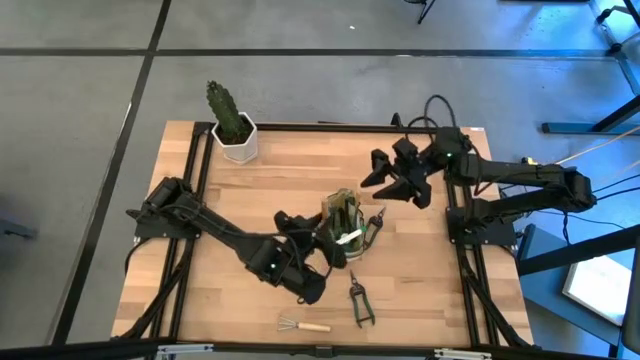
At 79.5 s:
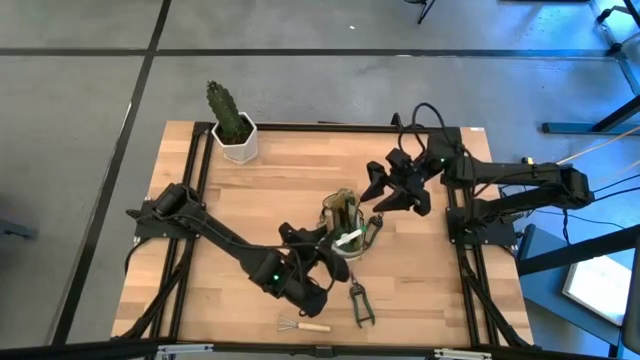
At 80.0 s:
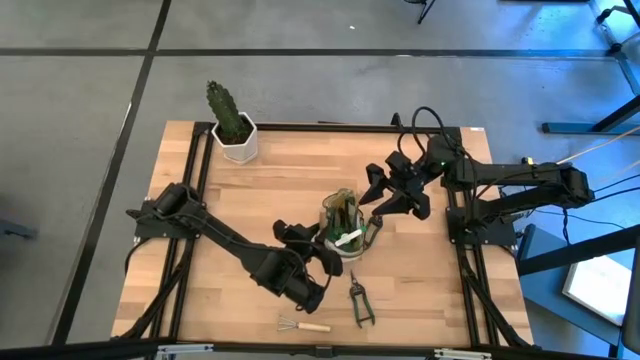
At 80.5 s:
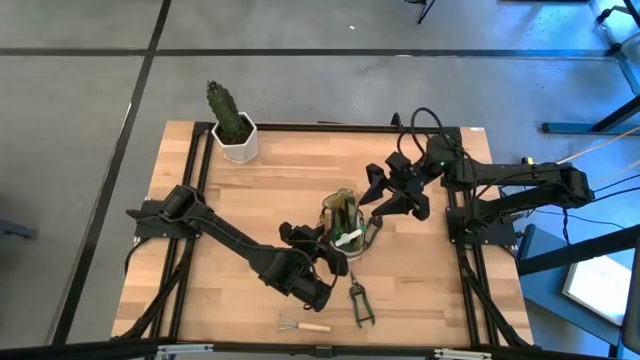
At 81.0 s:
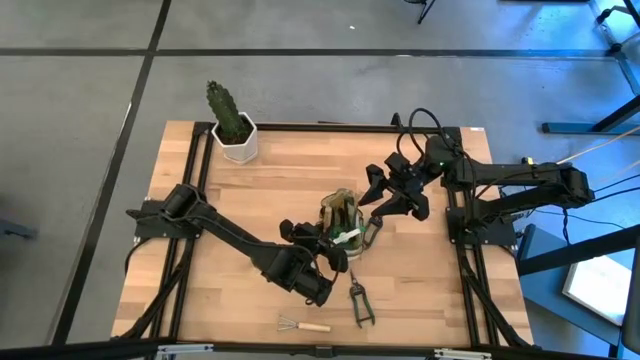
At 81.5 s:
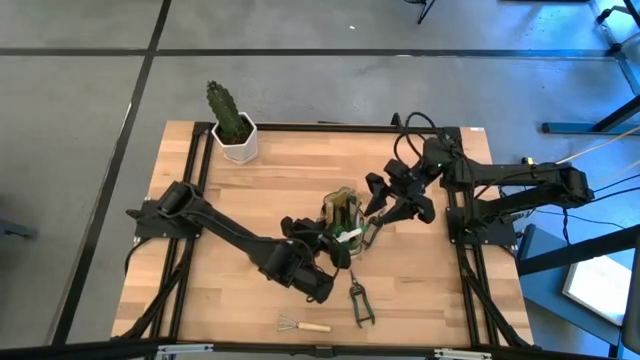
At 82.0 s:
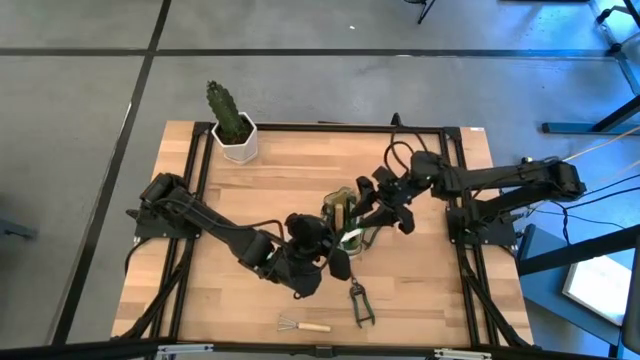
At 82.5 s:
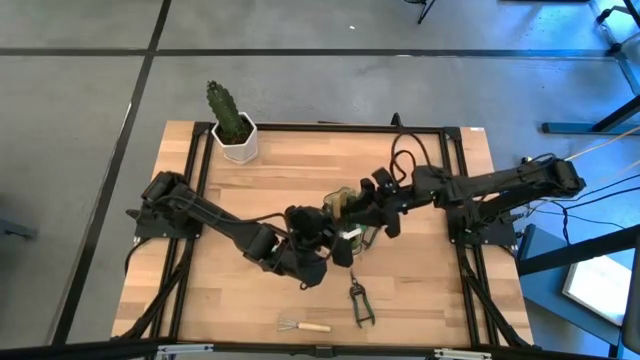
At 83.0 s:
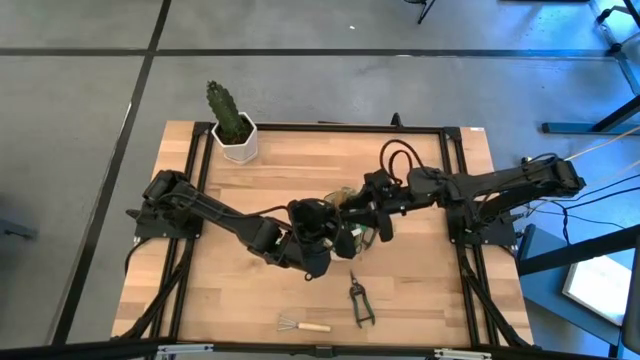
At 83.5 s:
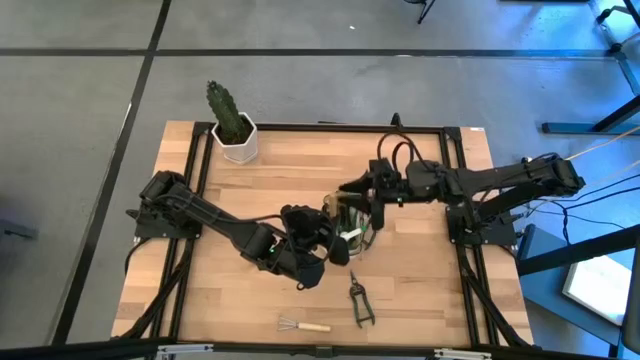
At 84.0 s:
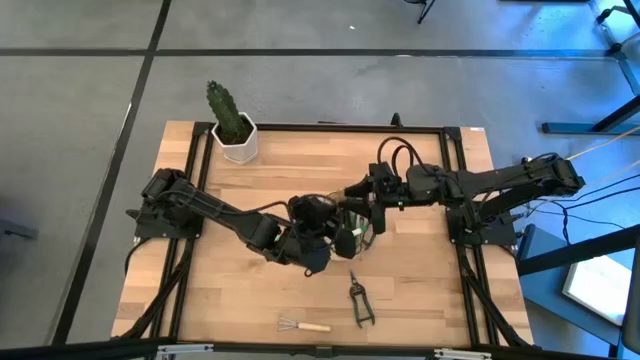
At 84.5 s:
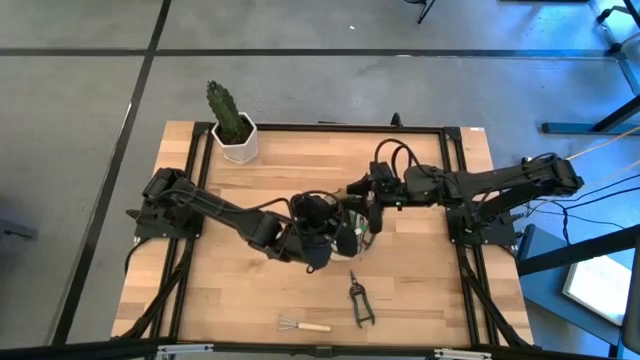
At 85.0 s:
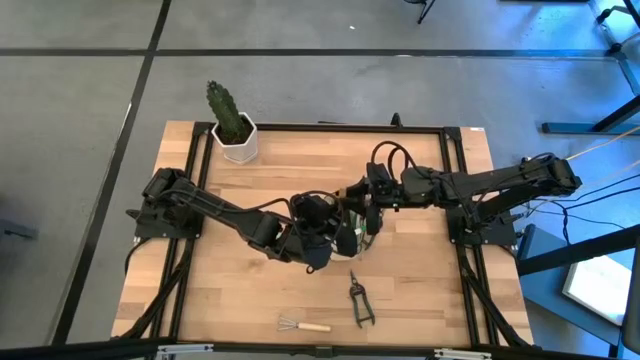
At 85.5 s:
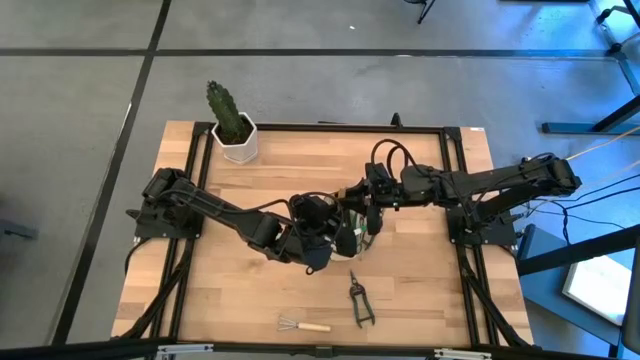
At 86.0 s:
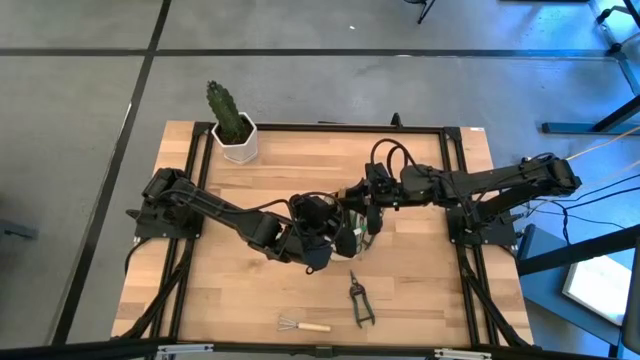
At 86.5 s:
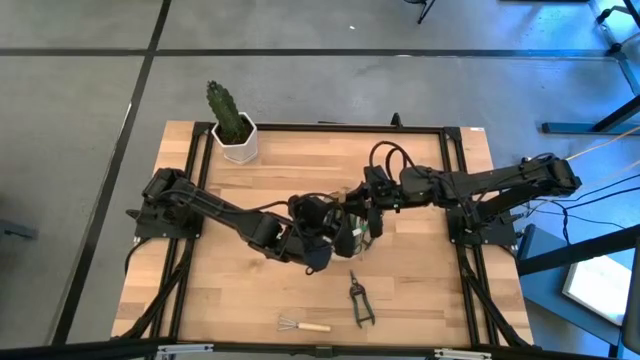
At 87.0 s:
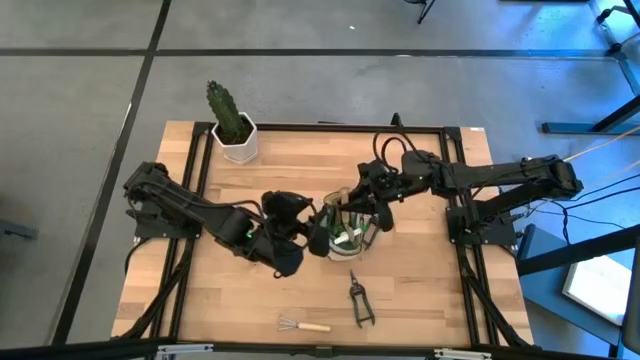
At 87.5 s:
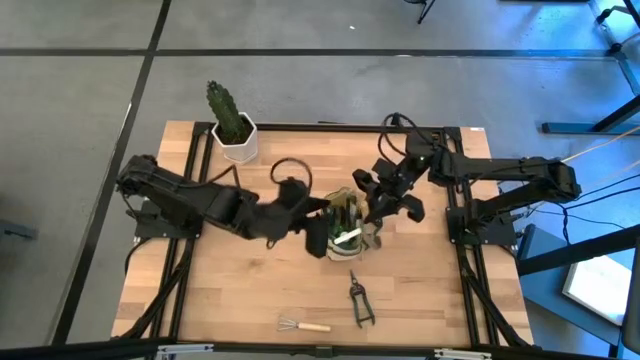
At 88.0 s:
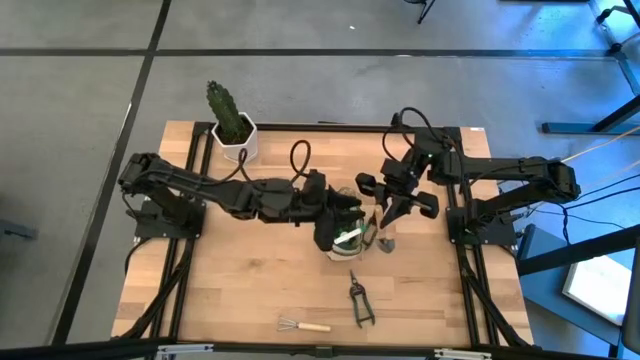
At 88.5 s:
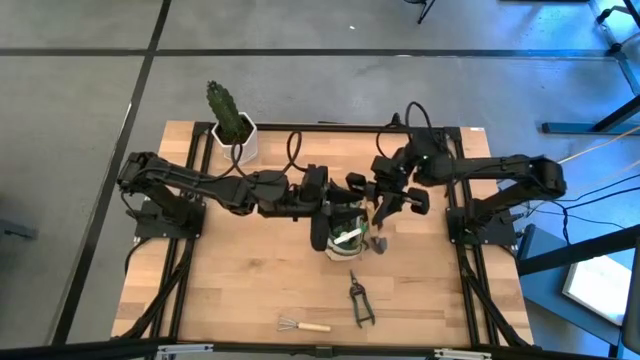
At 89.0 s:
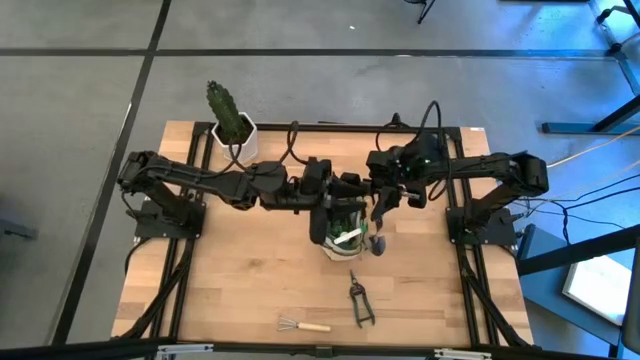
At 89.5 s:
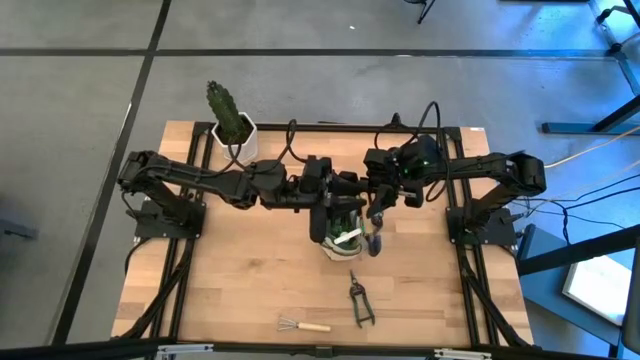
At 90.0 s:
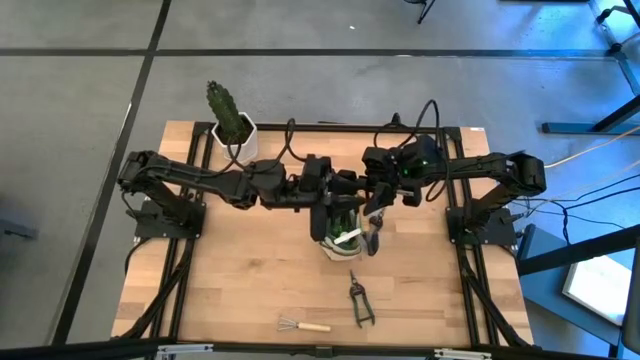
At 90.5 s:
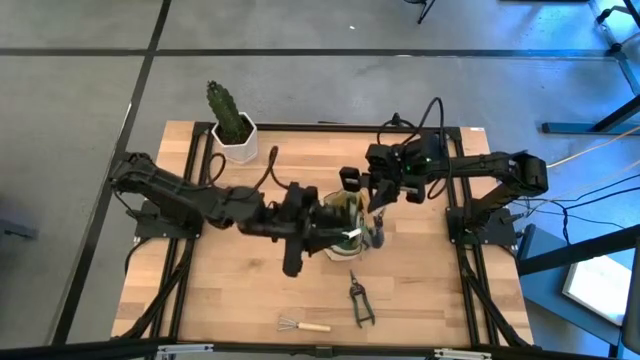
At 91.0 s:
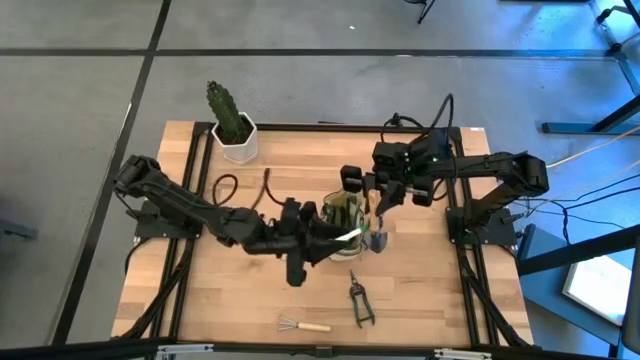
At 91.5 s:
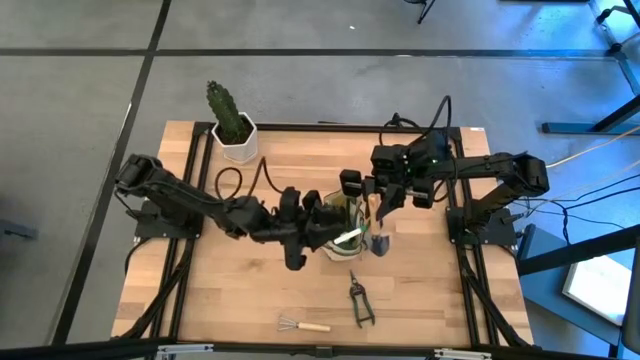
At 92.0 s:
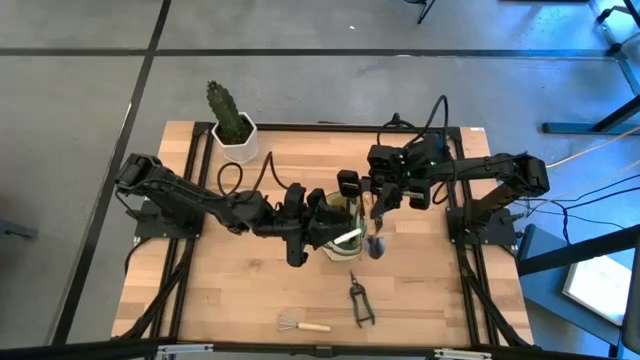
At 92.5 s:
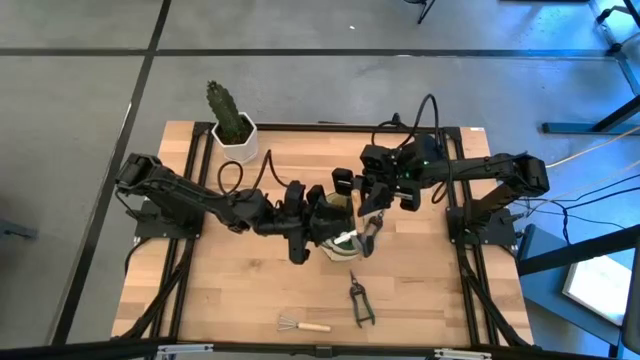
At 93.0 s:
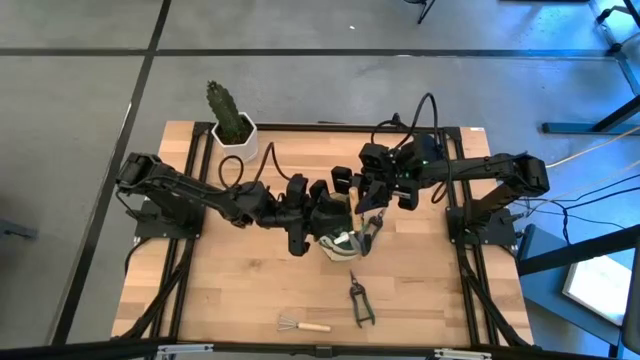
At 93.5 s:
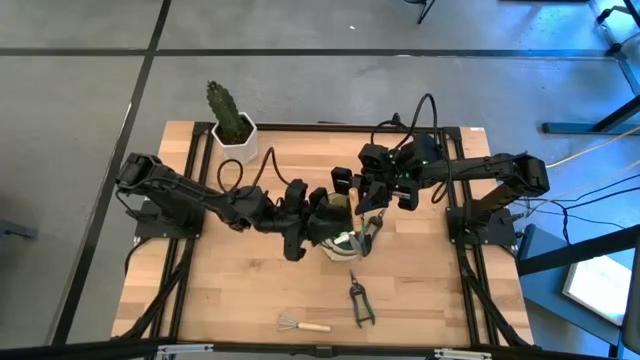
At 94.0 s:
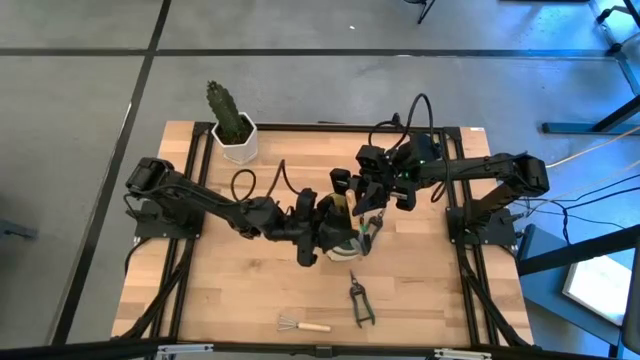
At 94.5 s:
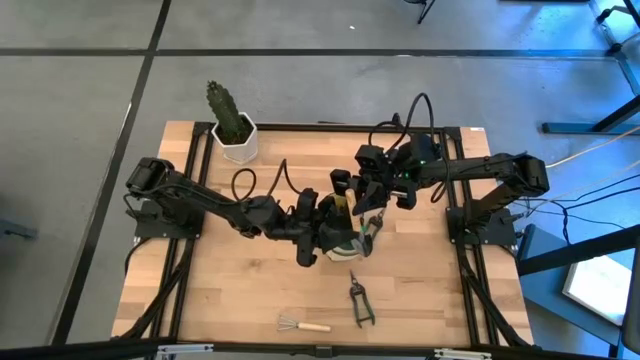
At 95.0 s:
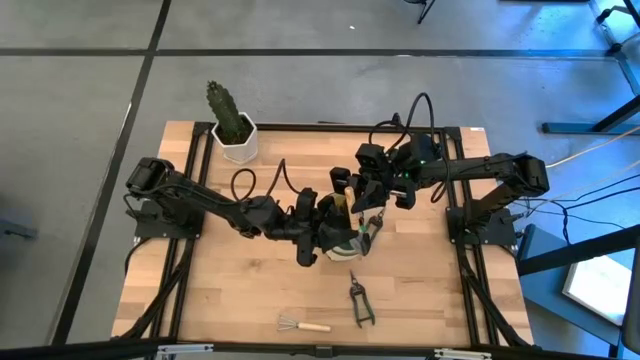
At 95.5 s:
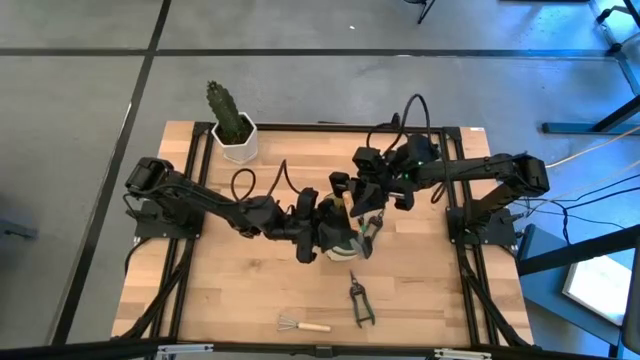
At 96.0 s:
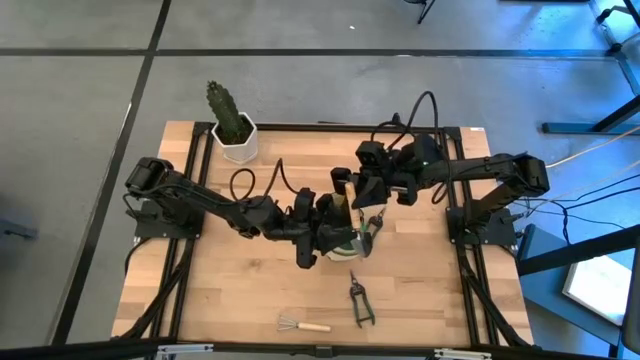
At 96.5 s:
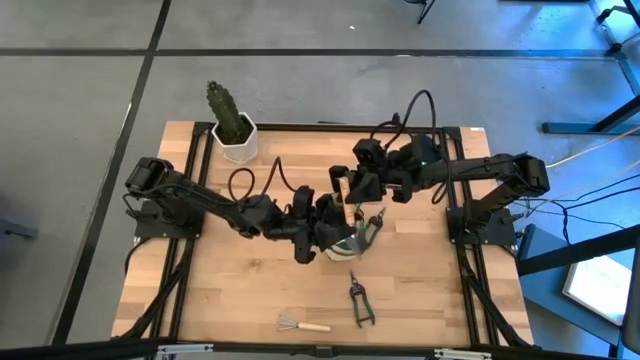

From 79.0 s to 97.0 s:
Task: Pick & Place Garden tools in Gardening bag
Put the trowel into the gardening bag

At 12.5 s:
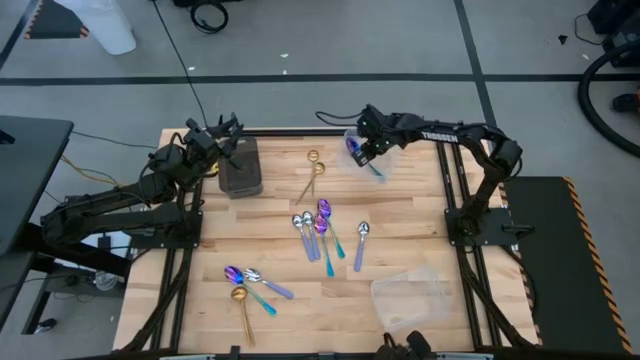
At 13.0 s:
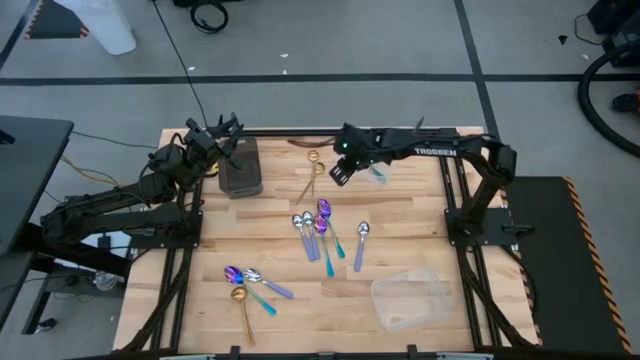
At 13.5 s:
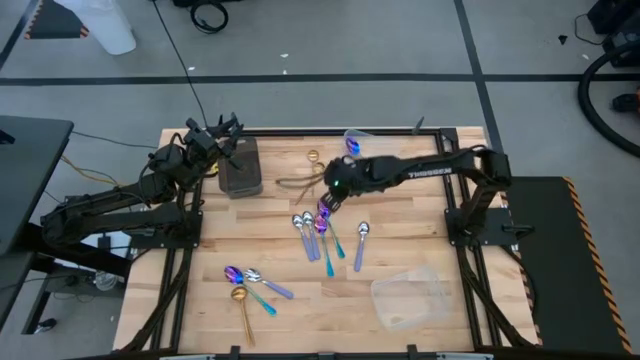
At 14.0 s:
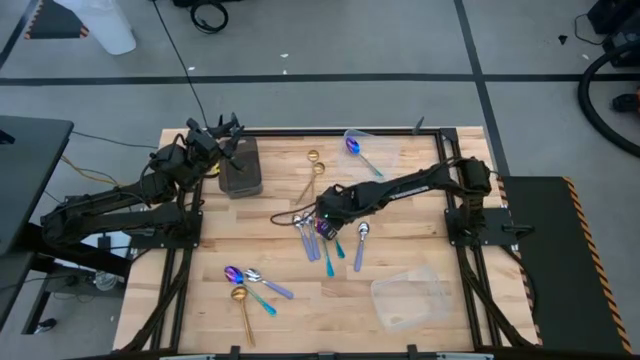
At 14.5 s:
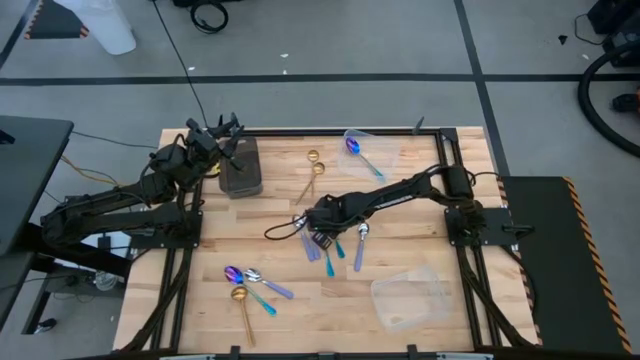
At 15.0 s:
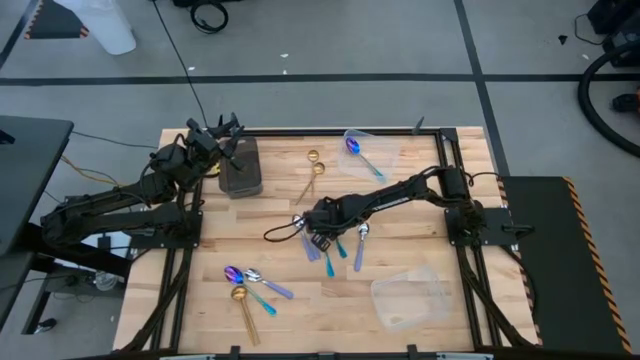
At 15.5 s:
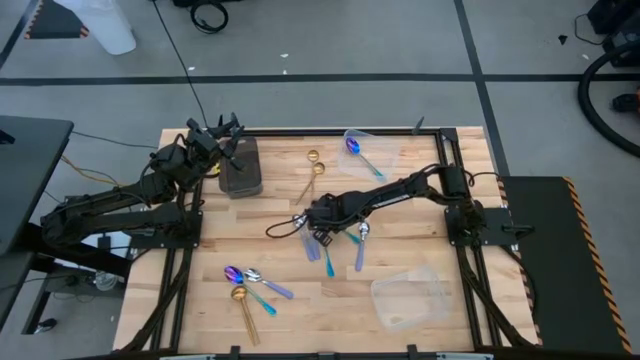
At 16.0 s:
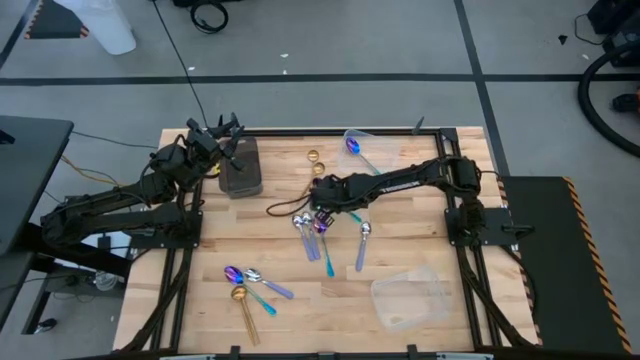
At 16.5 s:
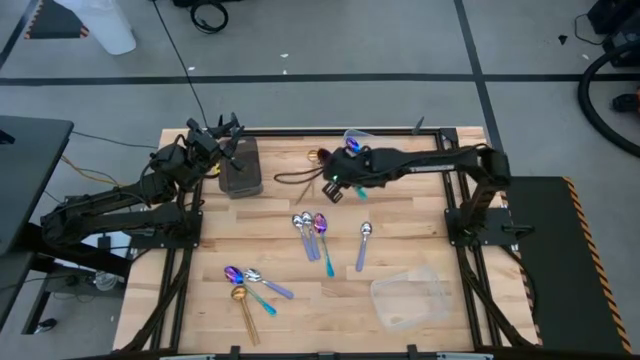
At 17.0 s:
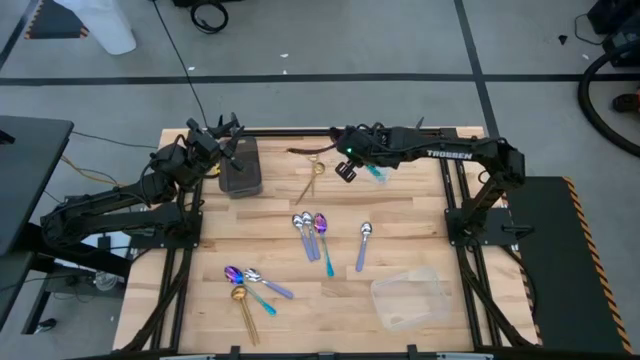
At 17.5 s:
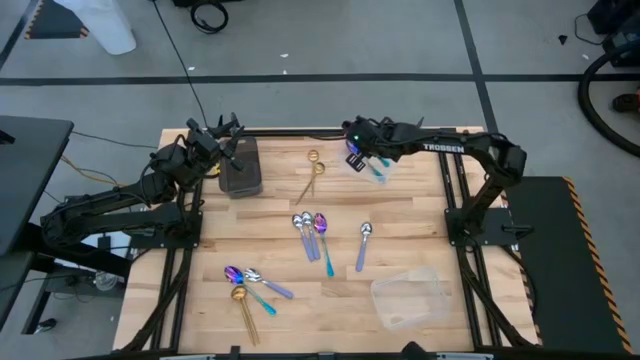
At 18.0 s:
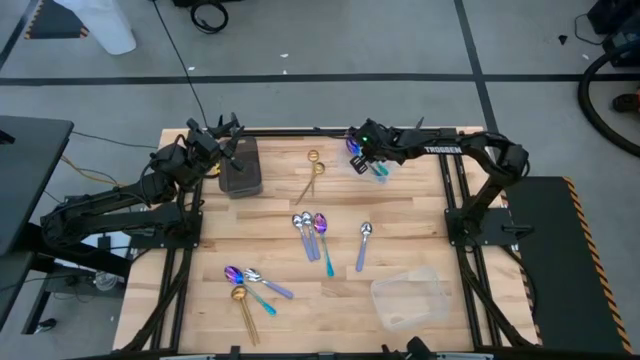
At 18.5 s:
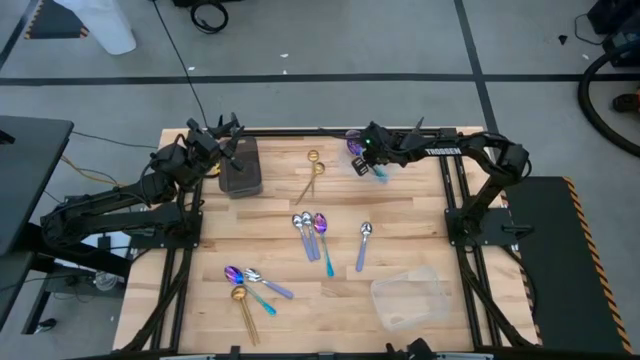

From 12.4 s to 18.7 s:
Task: Sort silverware by color (type)
Put the blue spoon into the top transparent bin
